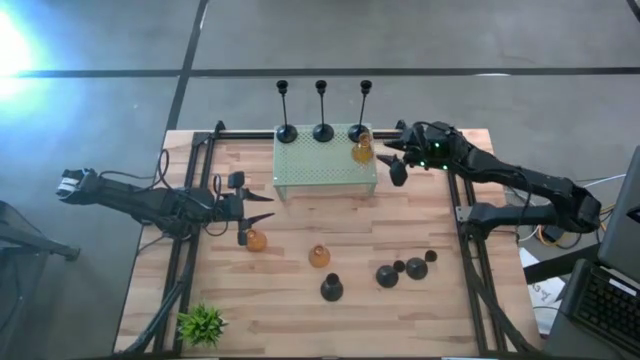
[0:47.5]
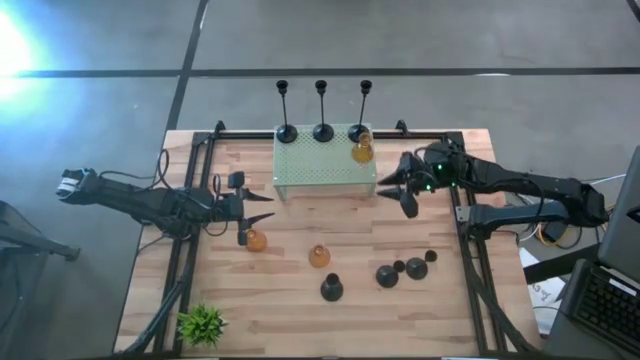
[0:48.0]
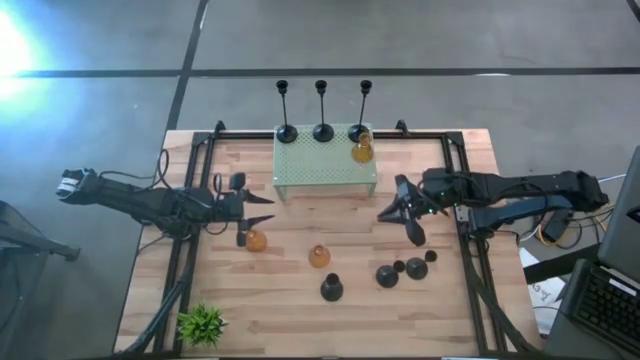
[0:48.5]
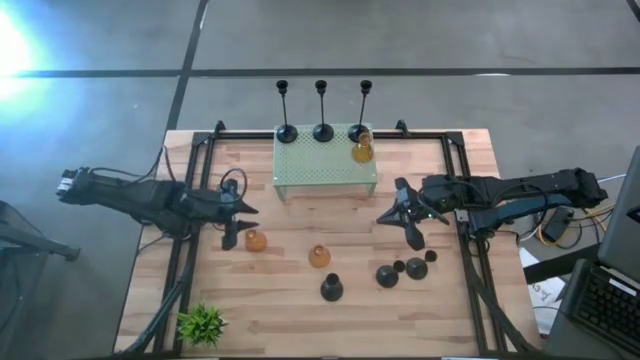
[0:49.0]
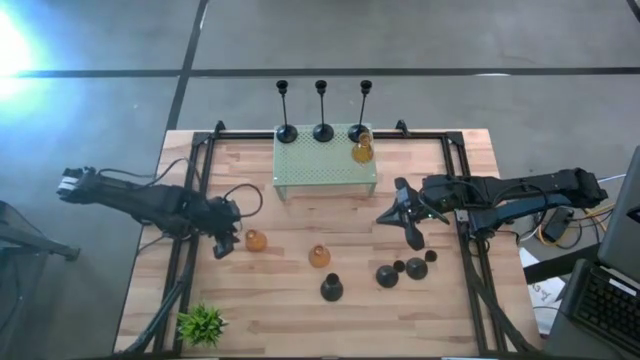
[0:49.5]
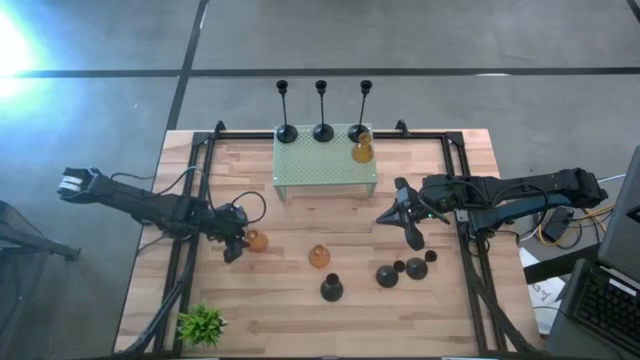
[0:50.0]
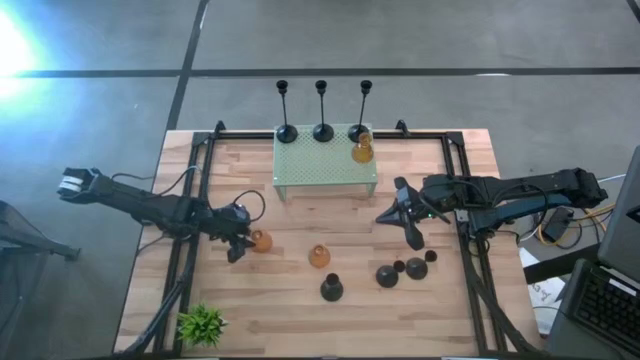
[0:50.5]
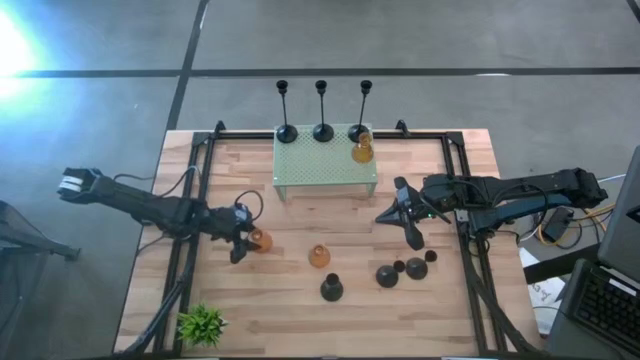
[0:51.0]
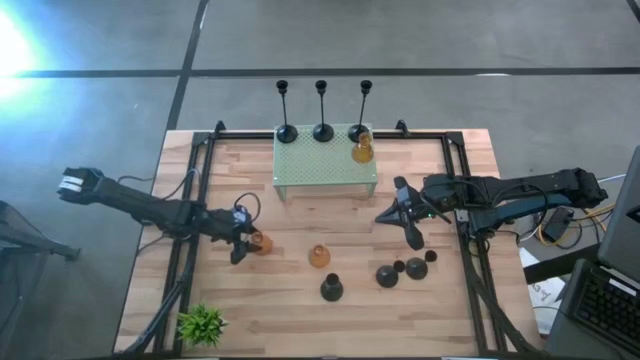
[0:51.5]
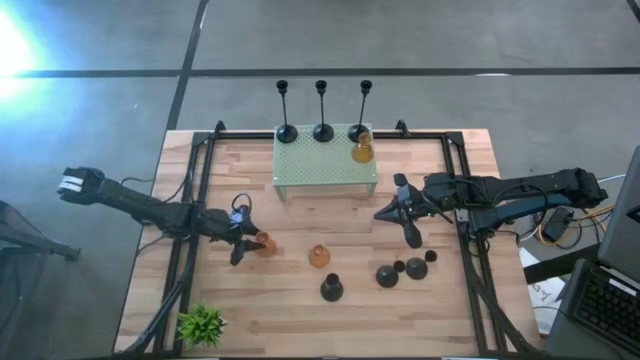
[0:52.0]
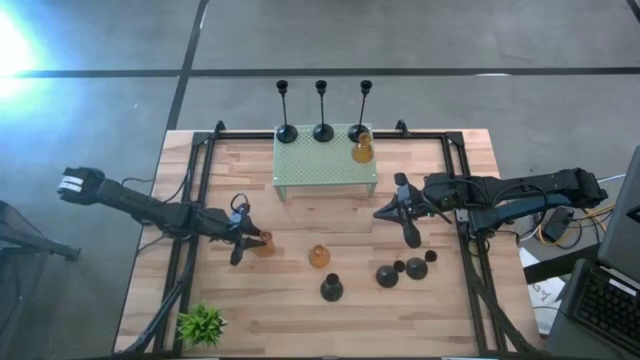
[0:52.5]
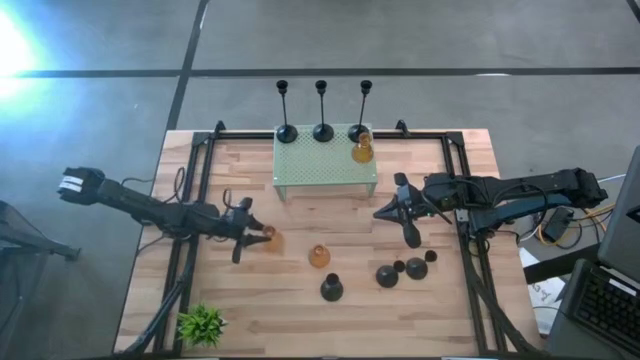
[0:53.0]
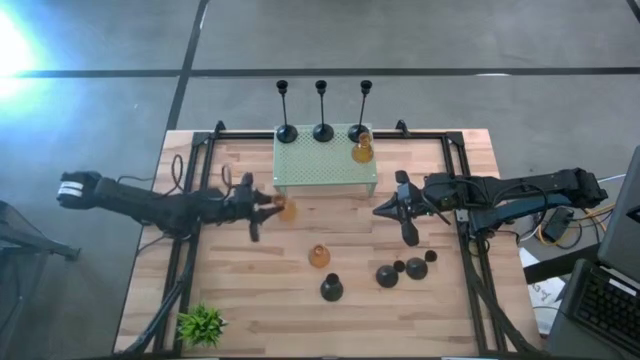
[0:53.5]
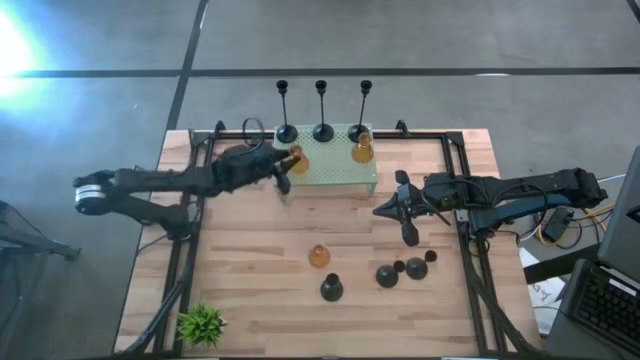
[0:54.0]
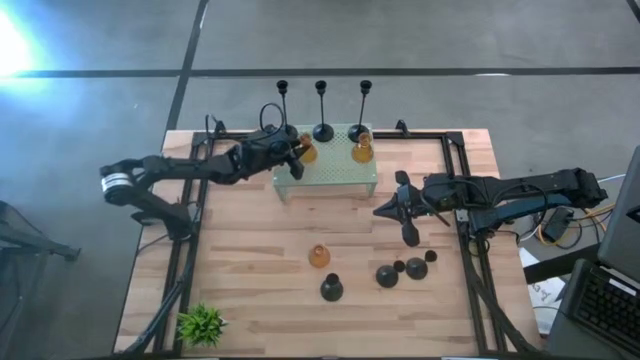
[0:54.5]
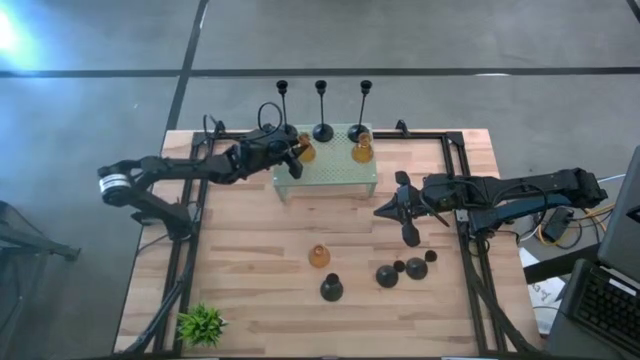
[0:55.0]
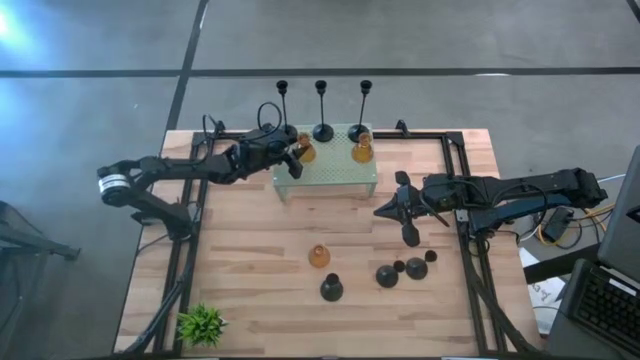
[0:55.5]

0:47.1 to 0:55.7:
Task: Pick & Place candle stick holders
Align the yellow glass candle holder with the other yellow glass candle holder on the shelf

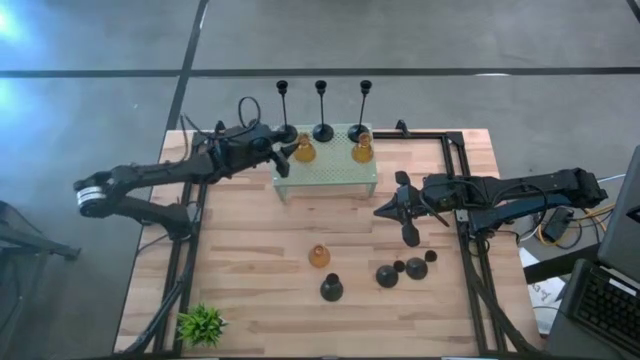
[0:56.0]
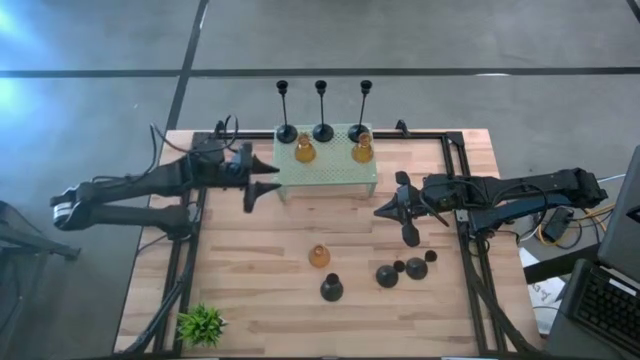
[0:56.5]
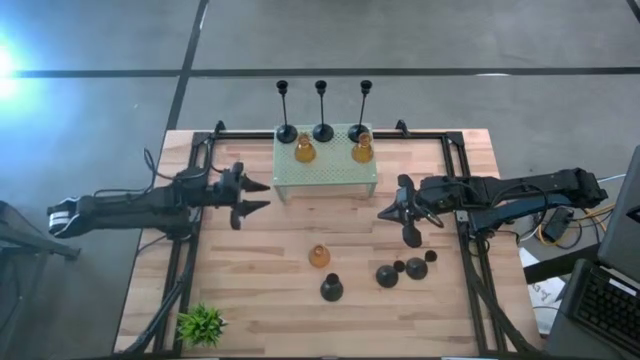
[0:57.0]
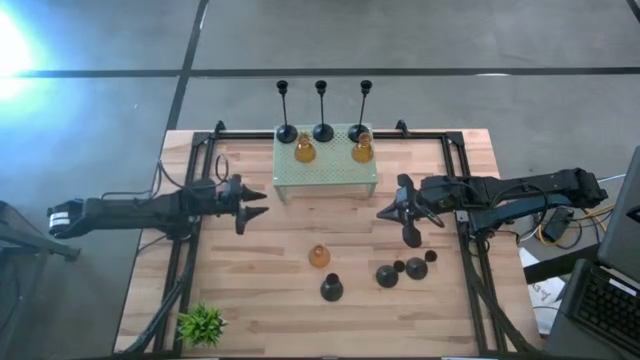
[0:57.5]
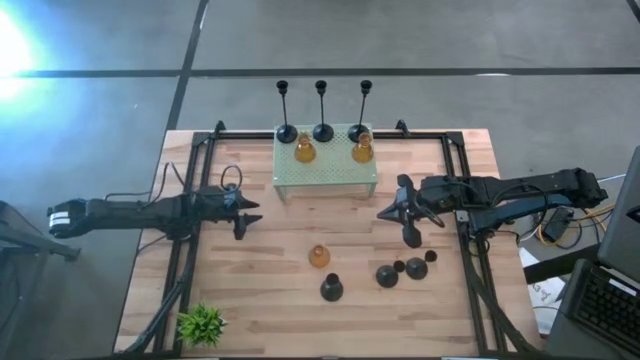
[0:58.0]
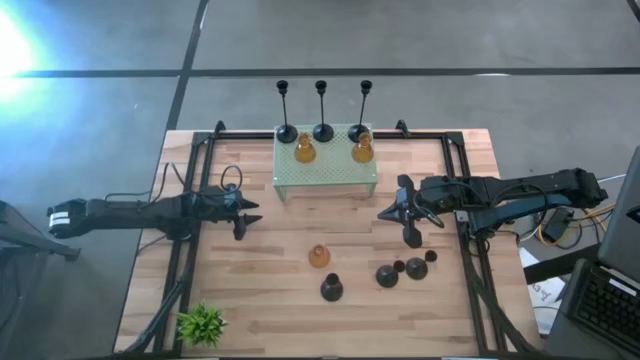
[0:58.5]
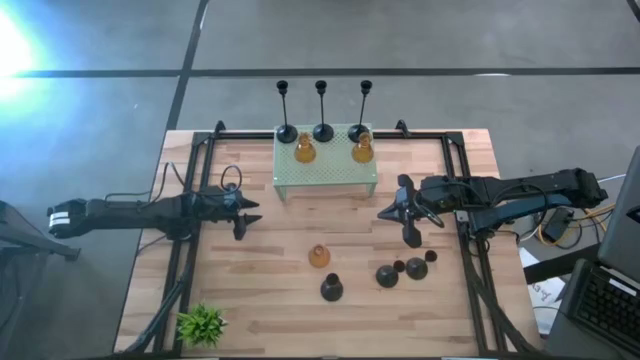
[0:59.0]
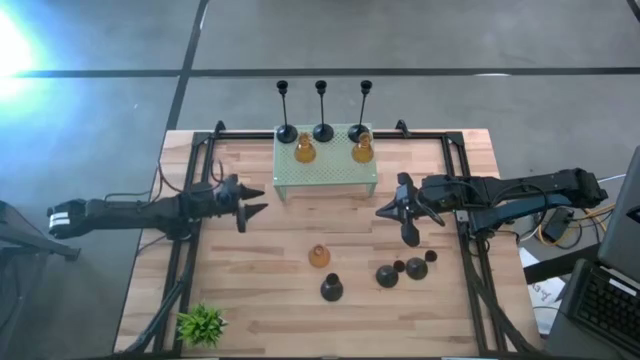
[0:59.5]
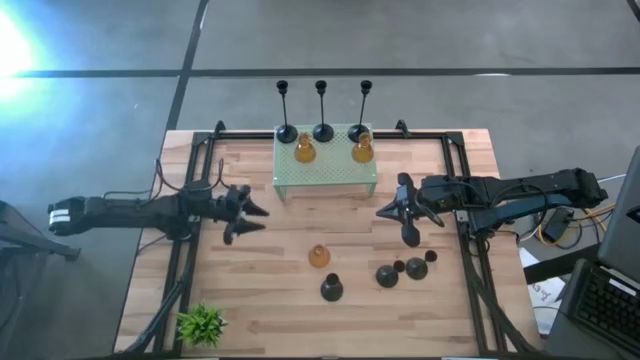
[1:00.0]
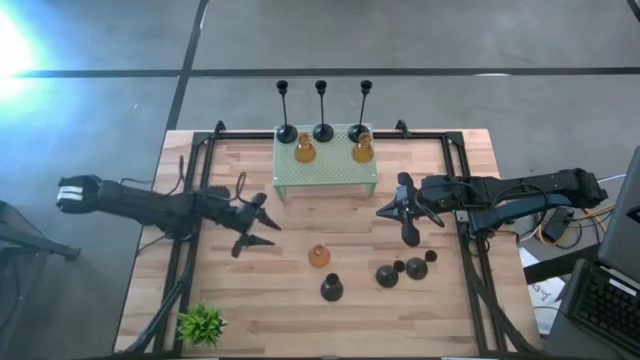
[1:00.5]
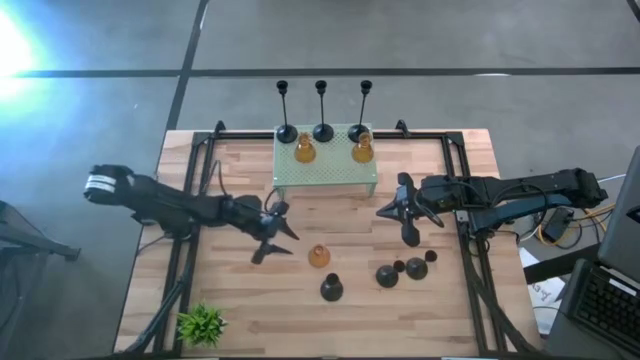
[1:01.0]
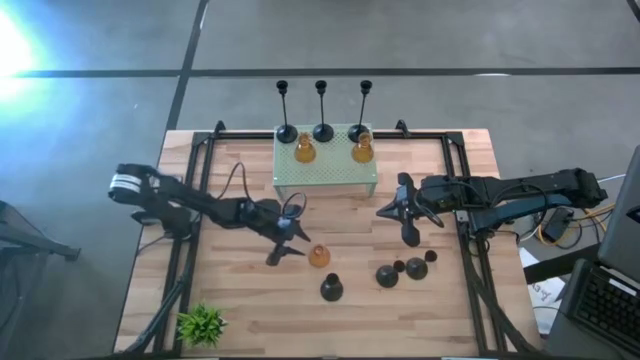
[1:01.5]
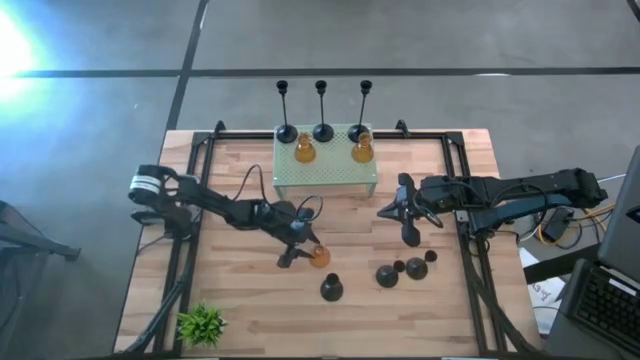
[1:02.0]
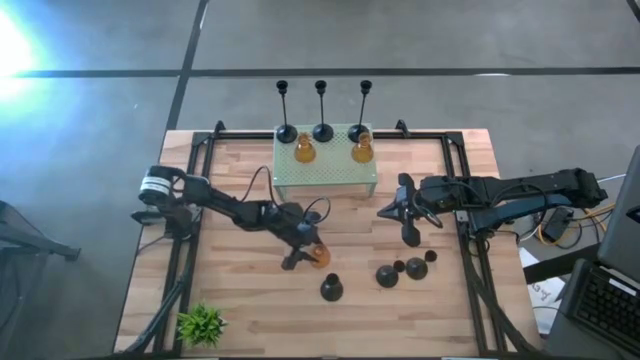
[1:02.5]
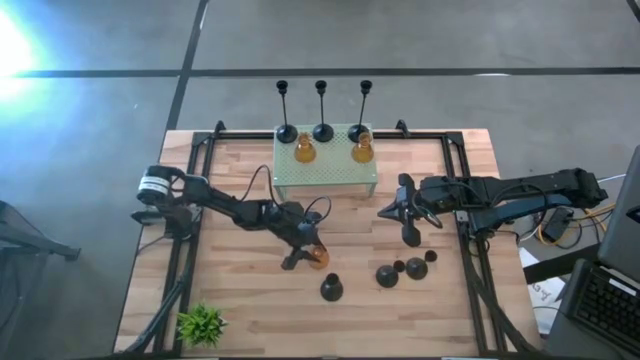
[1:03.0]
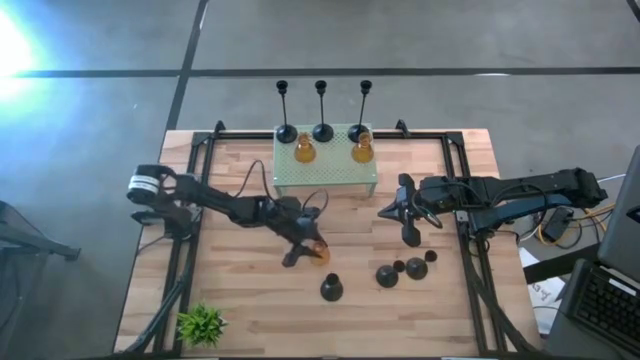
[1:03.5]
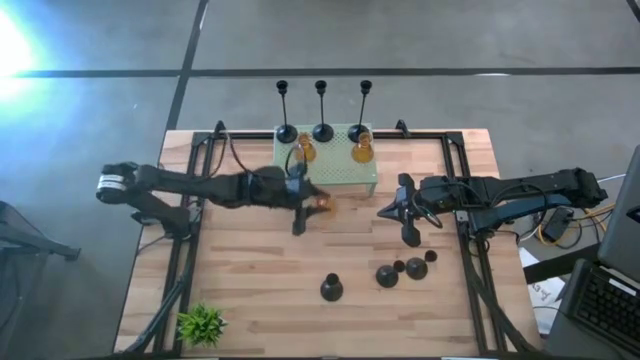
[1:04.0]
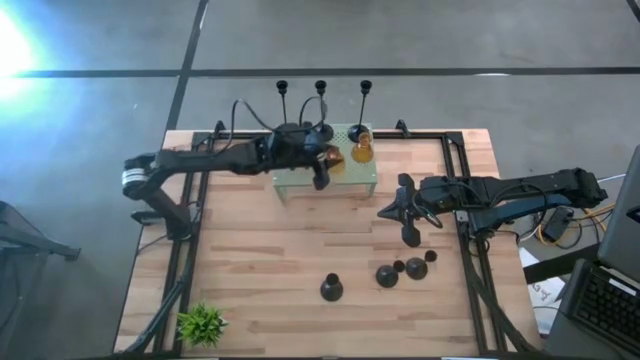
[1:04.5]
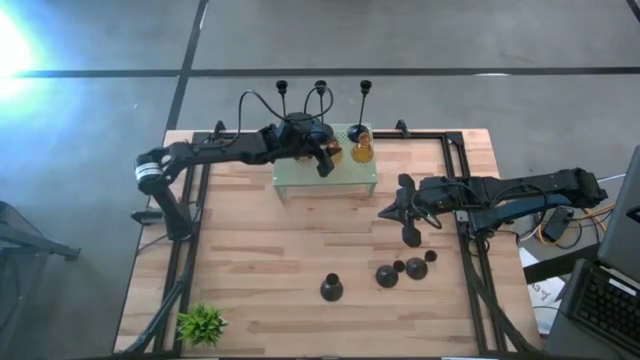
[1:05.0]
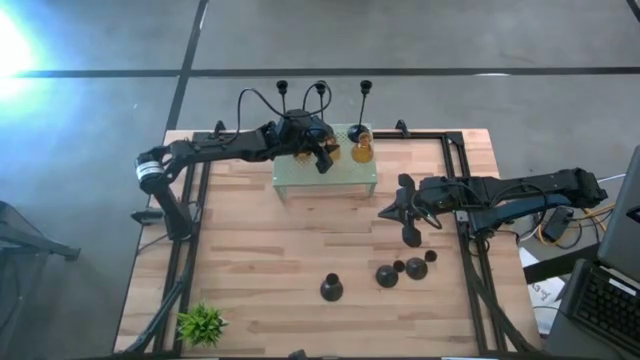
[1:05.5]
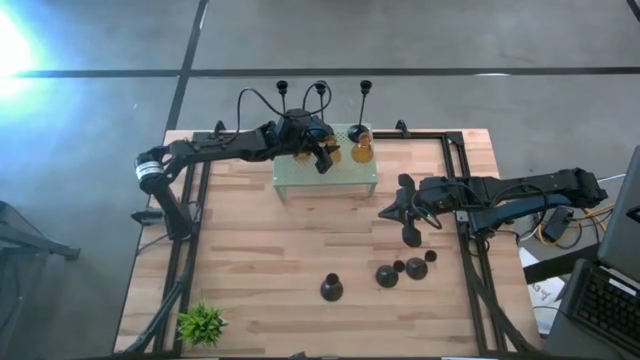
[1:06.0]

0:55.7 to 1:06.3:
Align the yellow glass candle holder with the other yellow glass candle holders on the shelf

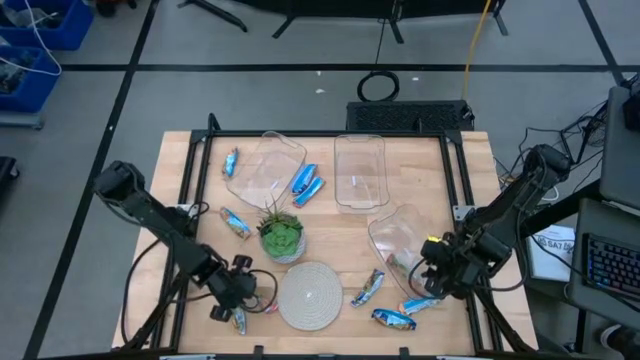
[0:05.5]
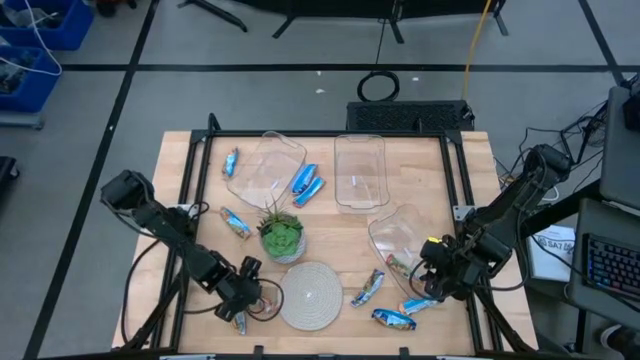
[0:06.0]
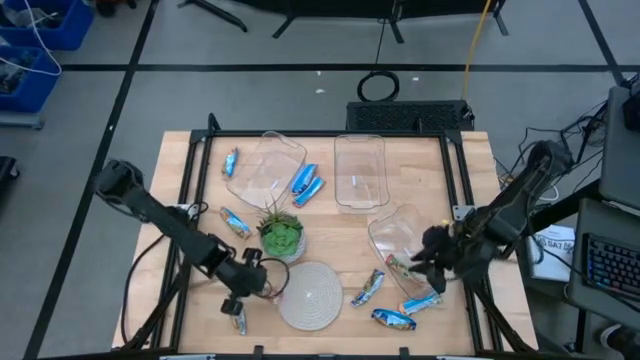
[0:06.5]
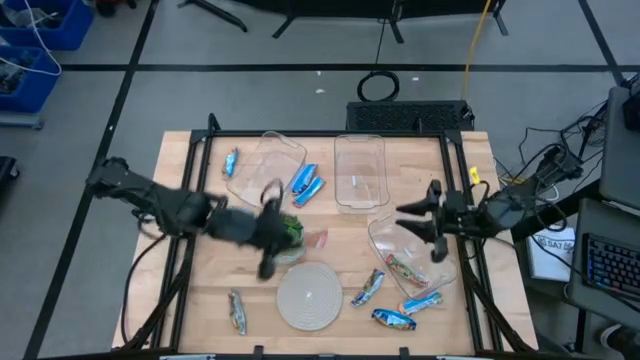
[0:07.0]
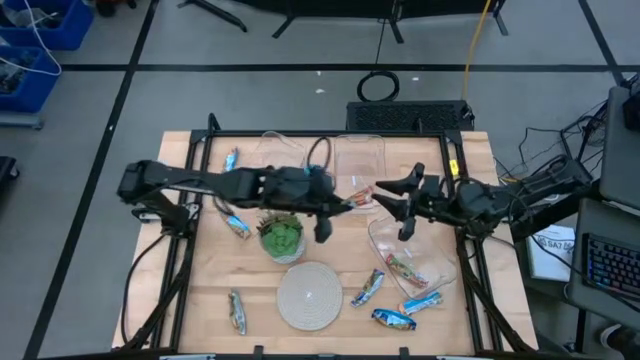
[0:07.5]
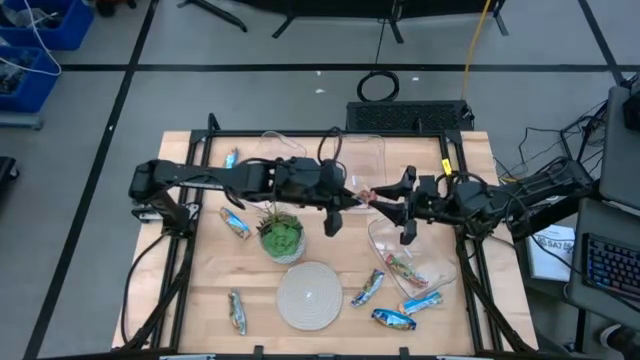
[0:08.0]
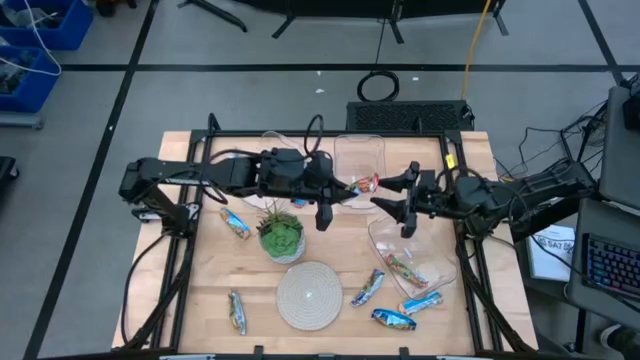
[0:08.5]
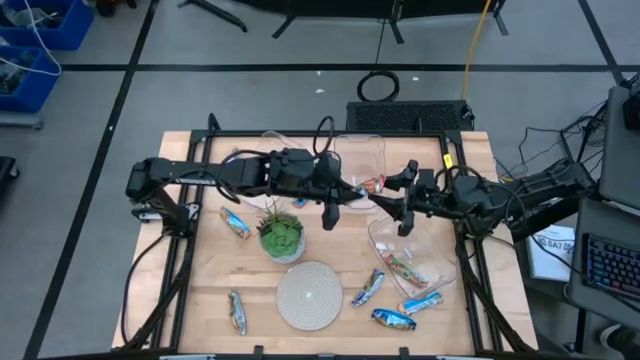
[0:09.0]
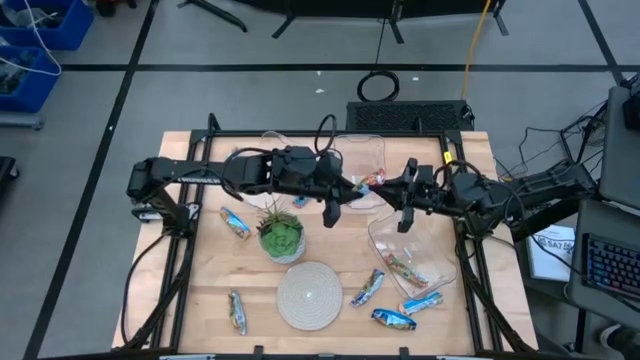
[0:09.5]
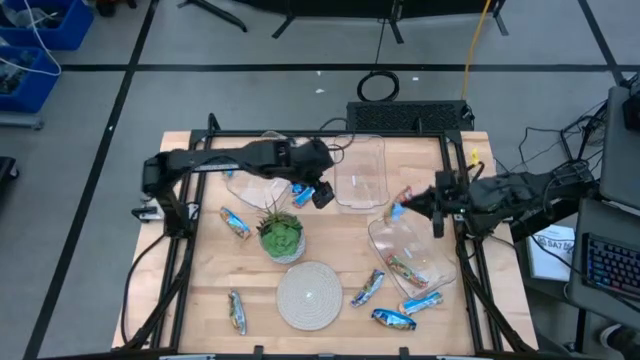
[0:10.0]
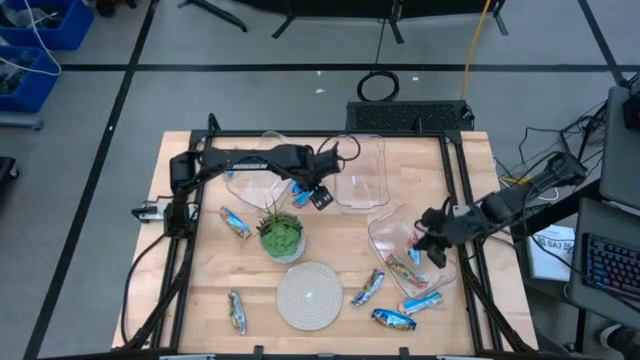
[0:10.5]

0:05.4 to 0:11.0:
Task: Pick and place Granola Bars by type
Put the red granola bar into the bottom right transparent bin
